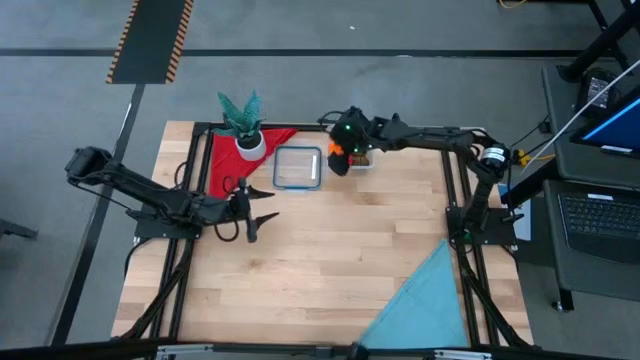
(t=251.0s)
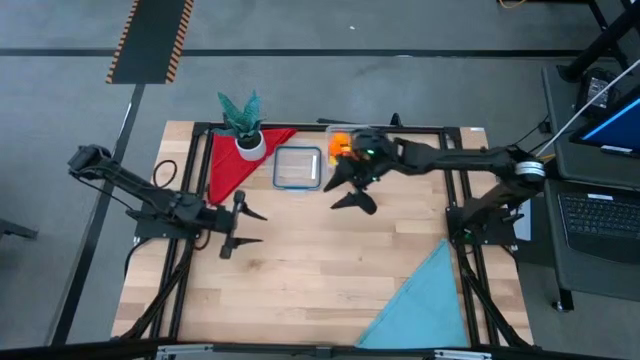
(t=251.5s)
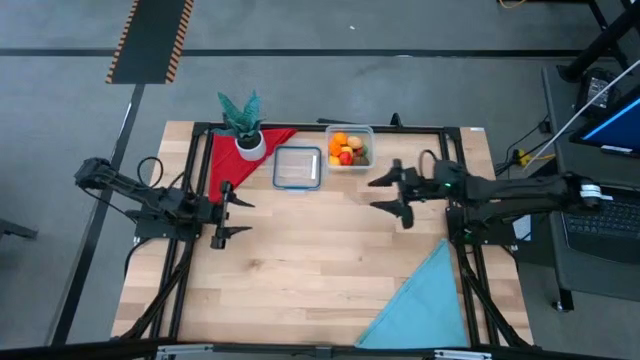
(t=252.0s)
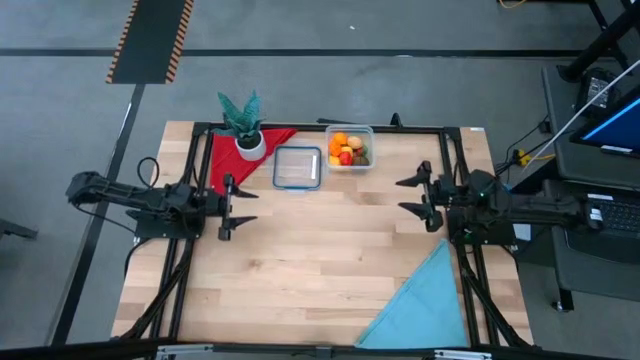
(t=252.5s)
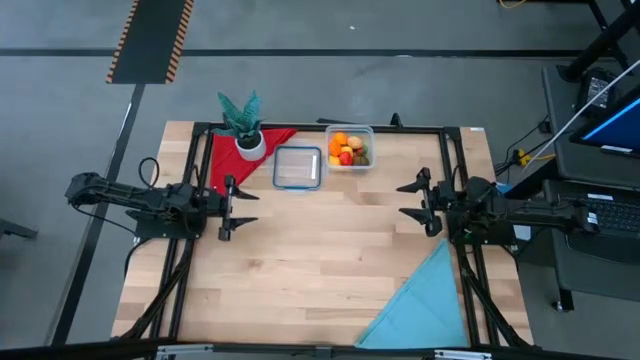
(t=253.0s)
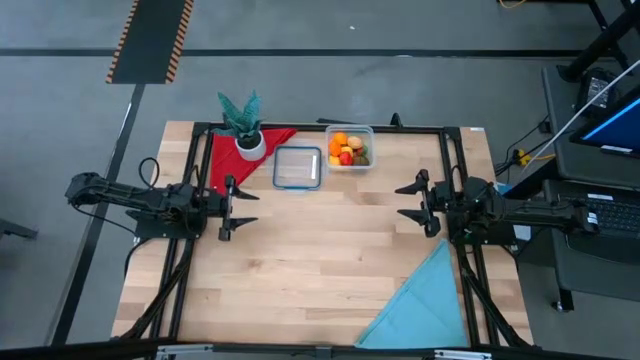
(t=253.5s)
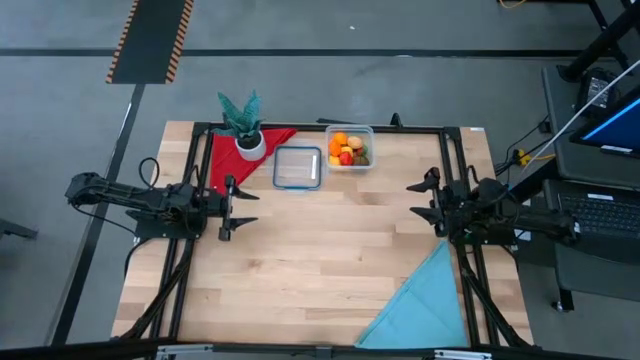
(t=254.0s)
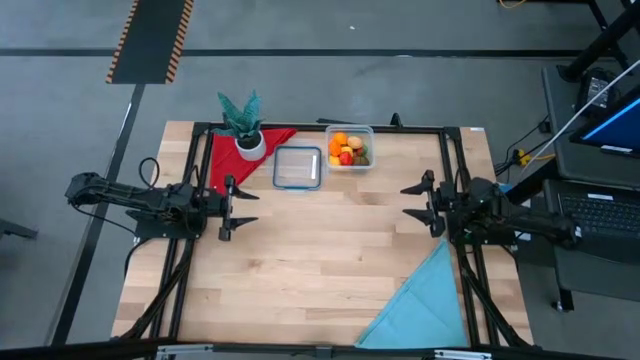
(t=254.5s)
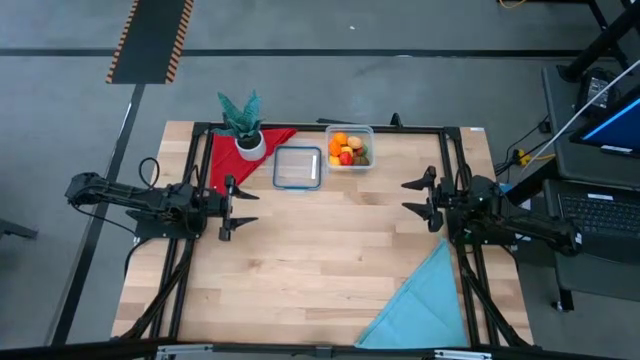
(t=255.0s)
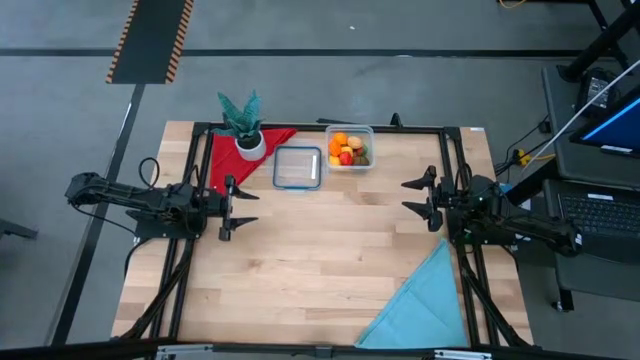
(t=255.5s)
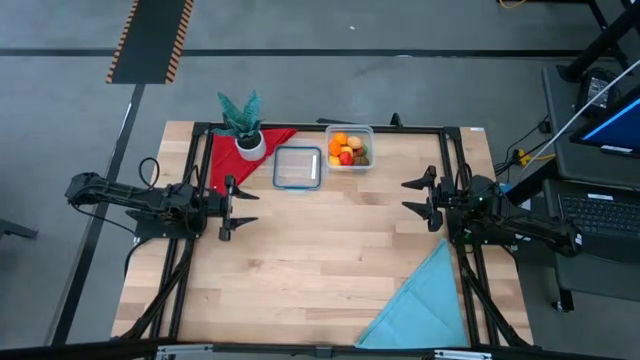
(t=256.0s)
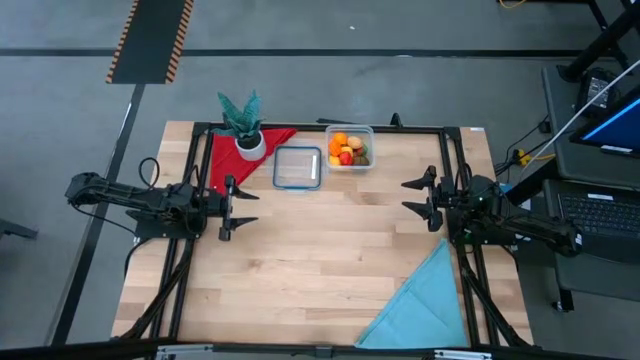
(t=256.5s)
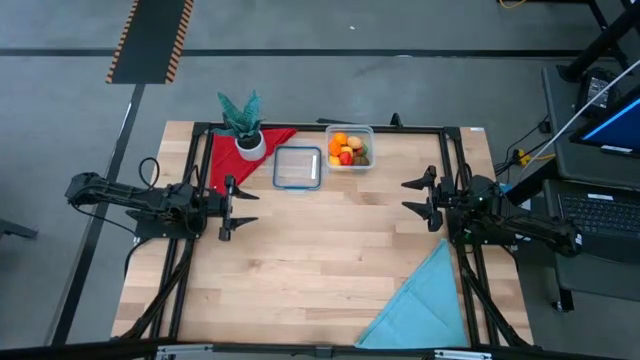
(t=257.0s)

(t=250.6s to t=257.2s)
Task: Pick and placing Produce into tupperware
Return to Home position

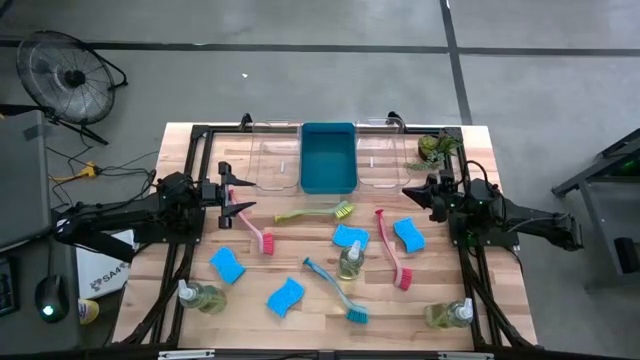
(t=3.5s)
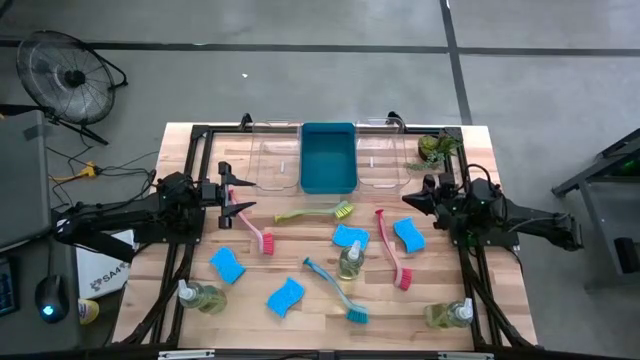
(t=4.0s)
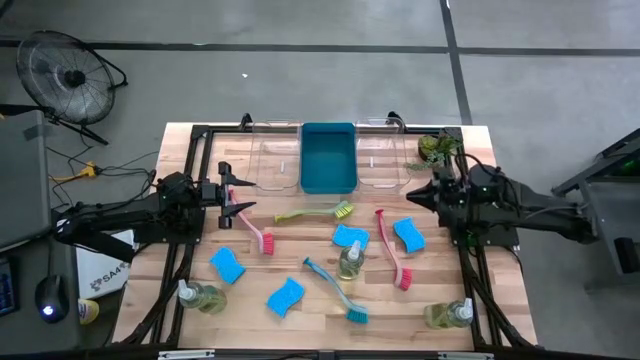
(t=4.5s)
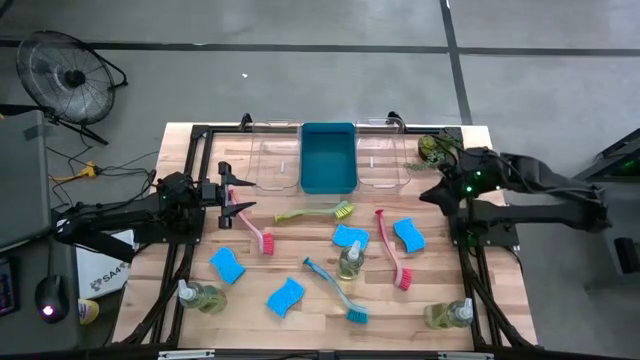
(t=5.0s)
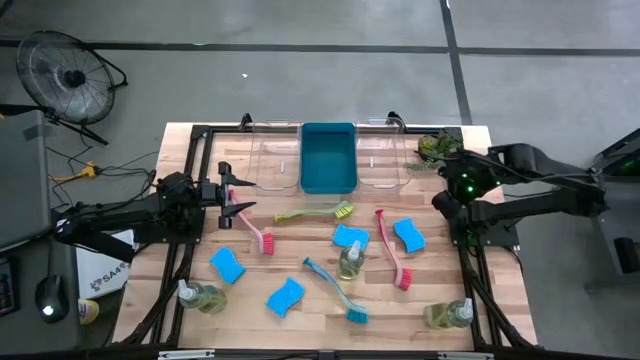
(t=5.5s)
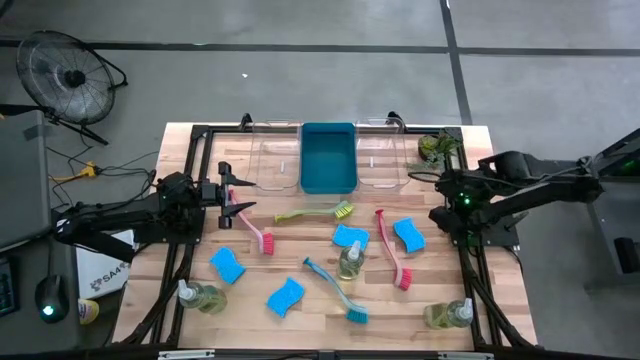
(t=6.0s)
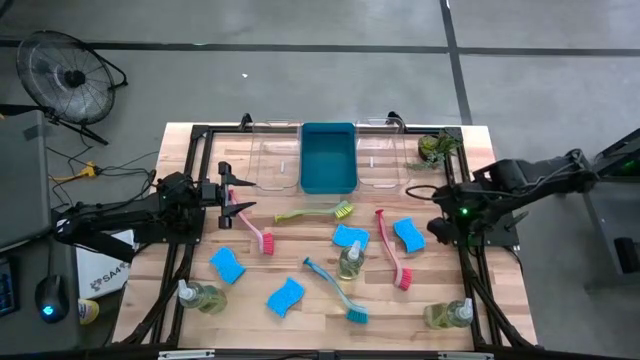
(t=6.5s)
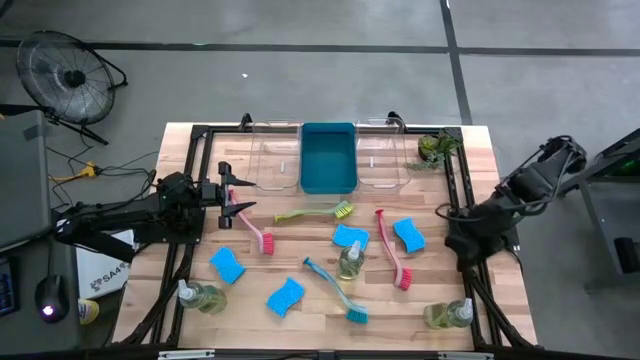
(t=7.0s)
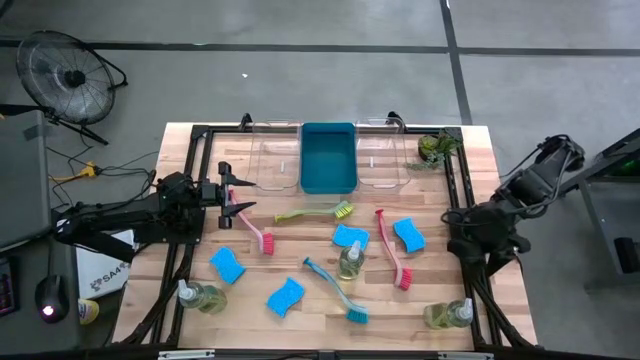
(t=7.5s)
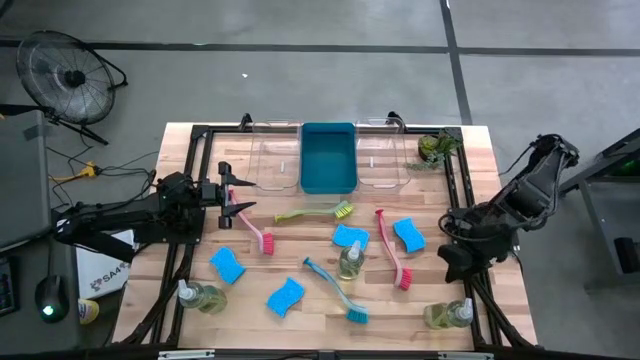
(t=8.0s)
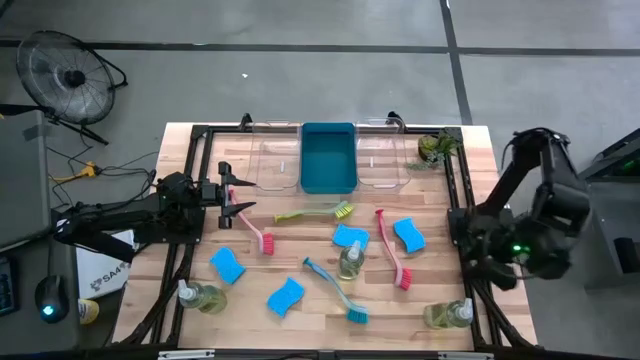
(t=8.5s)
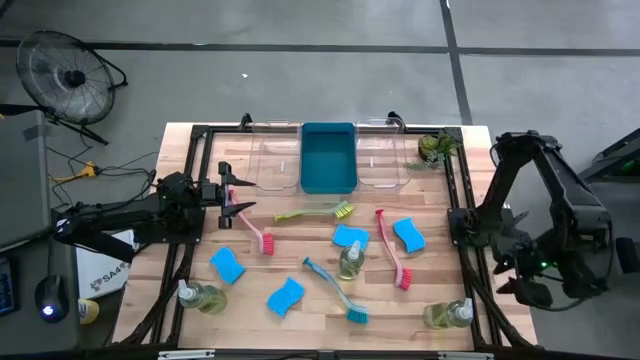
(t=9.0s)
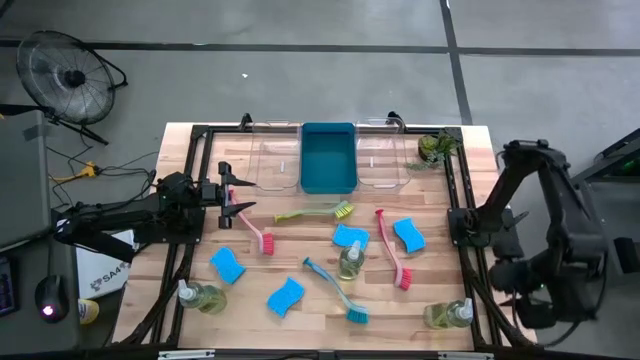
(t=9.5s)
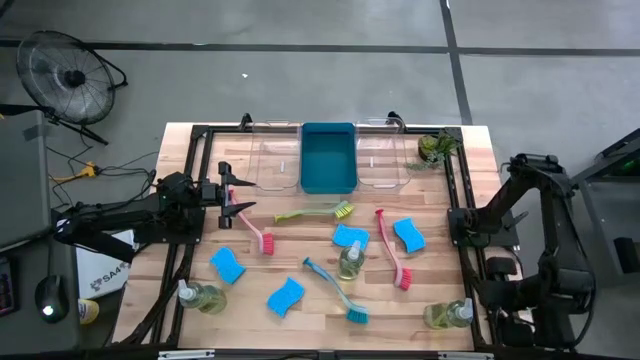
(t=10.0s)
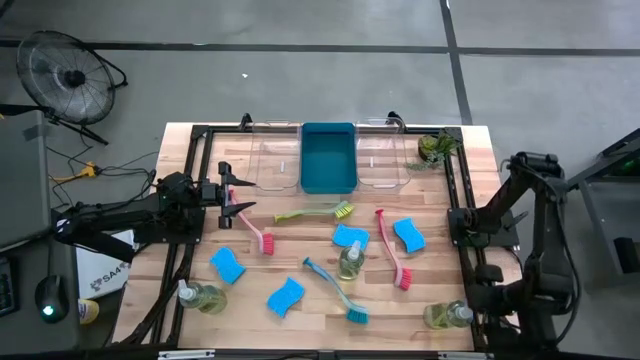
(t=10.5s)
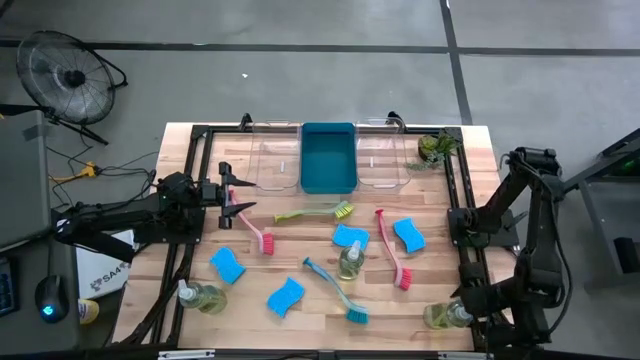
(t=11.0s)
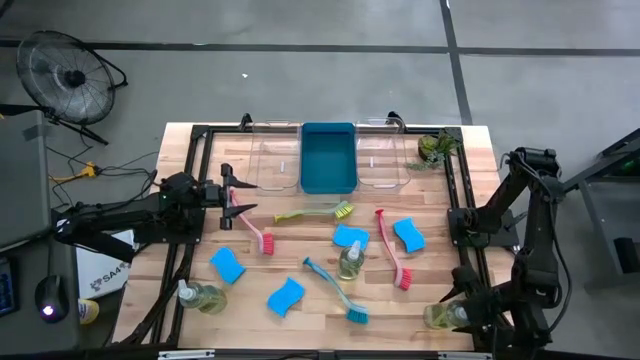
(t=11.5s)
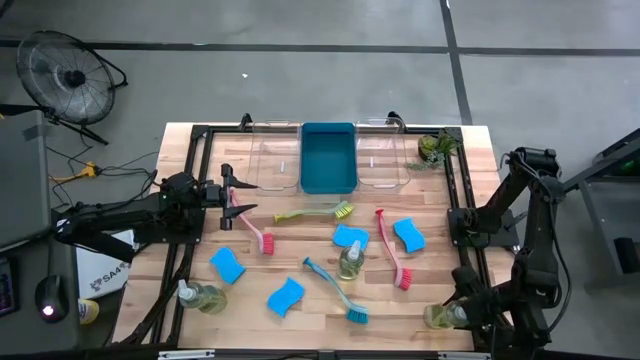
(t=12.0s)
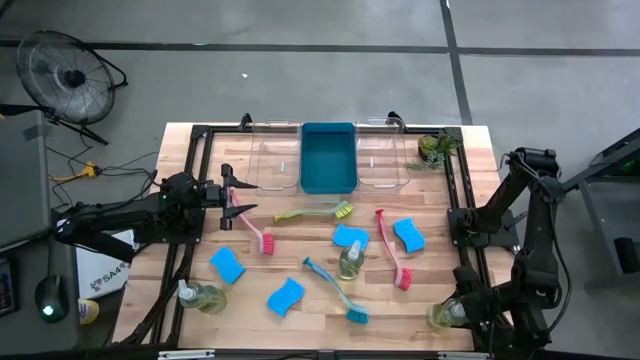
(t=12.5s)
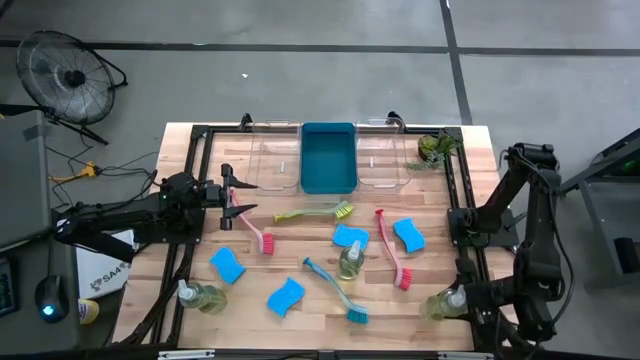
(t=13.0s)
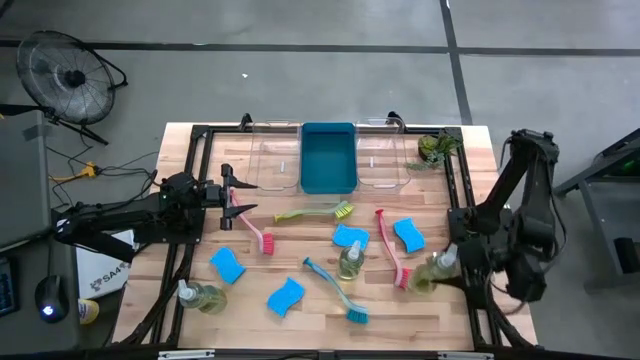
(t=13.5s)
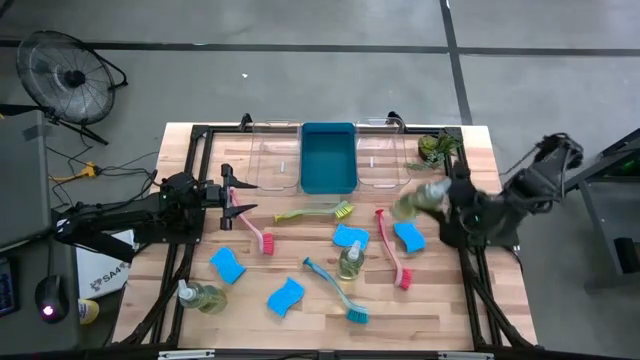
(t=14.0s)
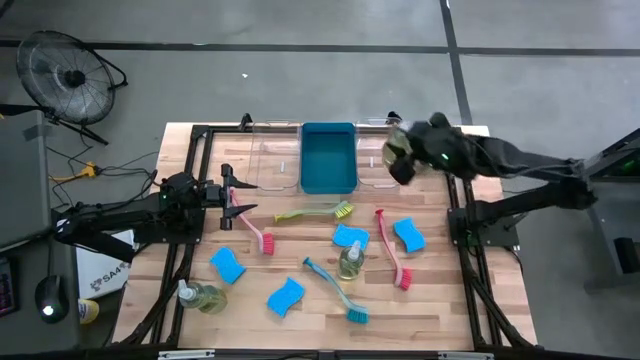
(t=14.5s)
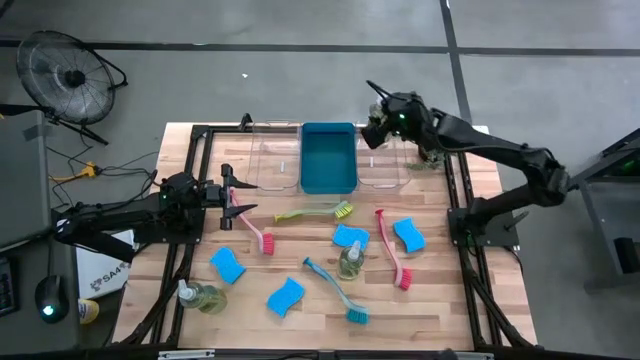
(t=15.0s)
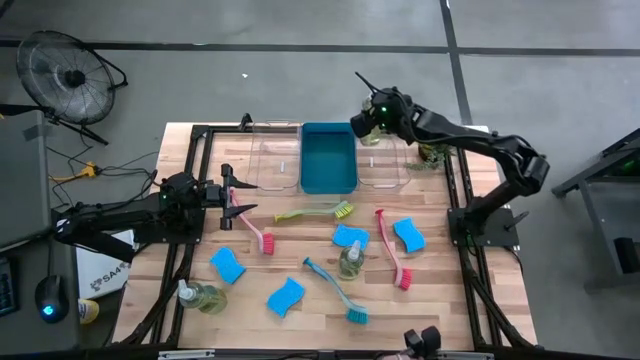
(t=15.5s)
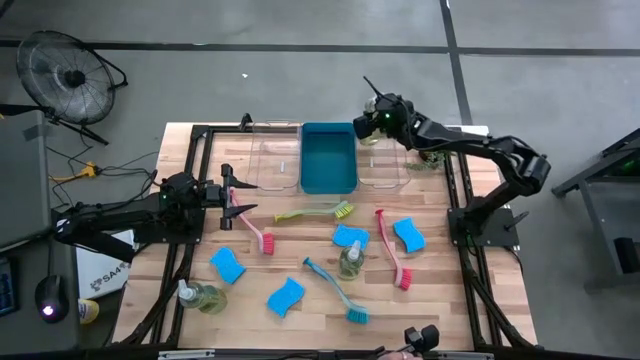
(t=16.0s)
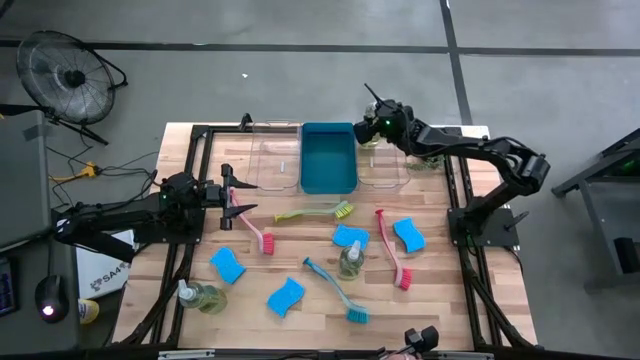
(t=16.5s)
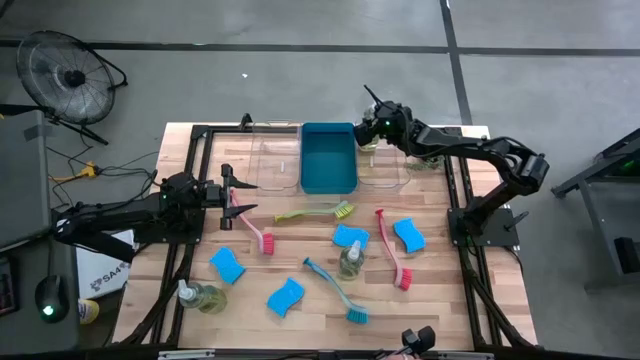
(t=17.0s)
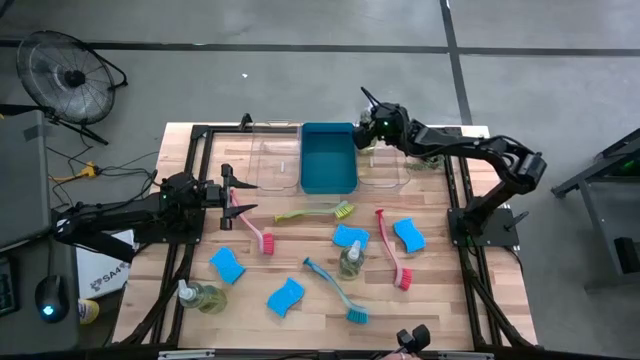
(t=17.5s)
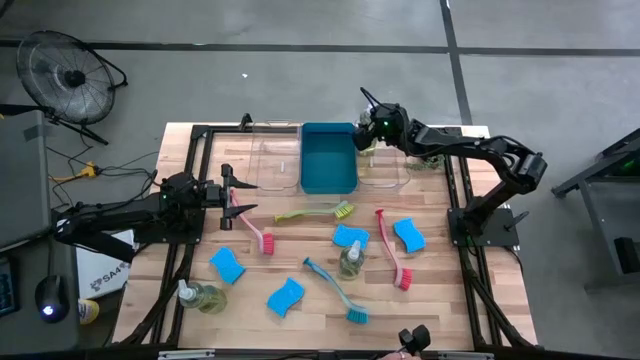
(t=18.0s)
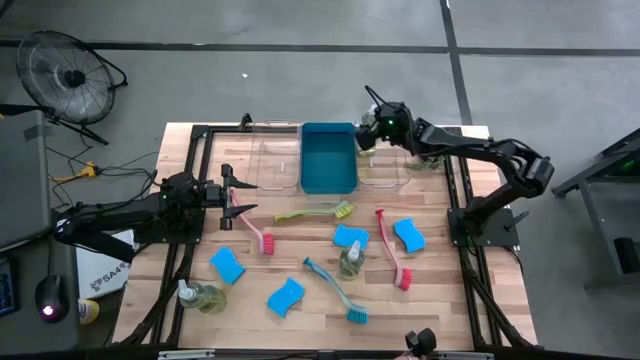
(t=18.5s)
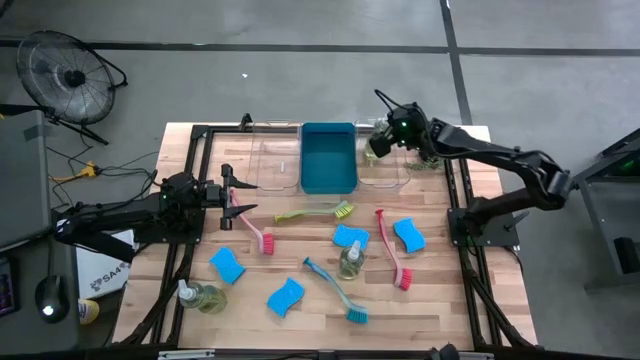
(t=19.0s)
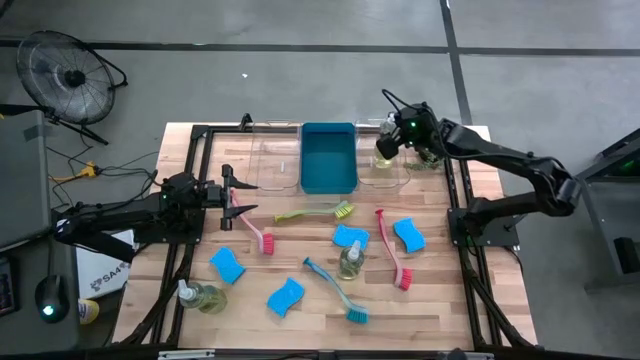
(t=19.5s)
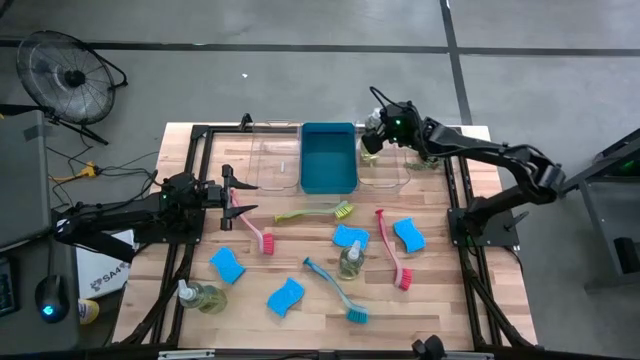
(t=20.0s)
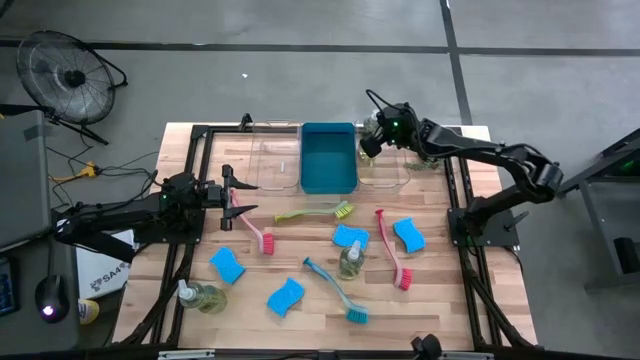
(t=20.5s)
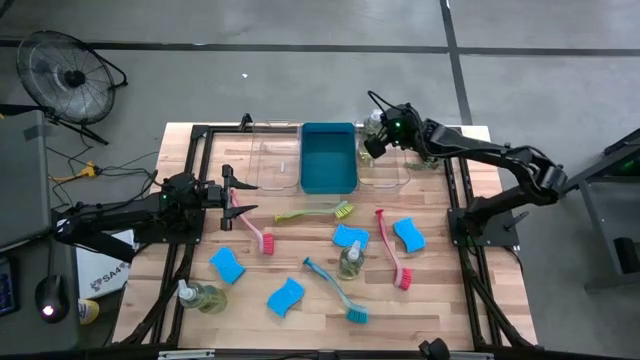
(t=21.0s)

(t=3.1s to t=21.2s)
Task: Pick & Place Kitchen Sink Supplies
Put the green dish soap into the right transparent bin
